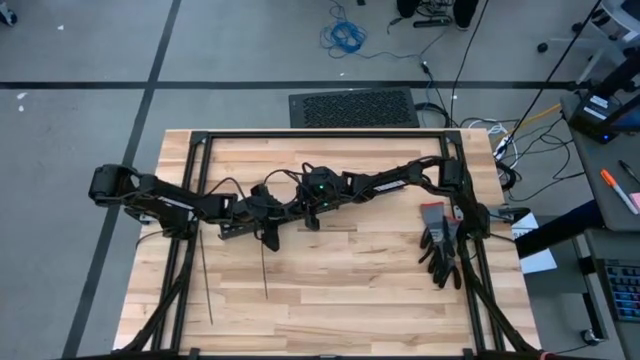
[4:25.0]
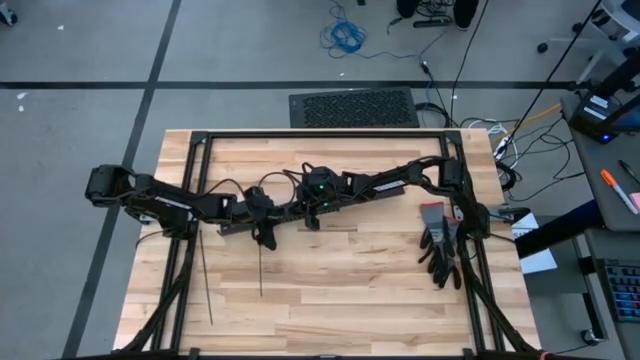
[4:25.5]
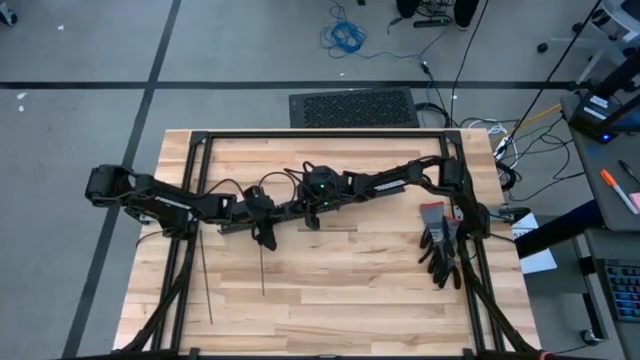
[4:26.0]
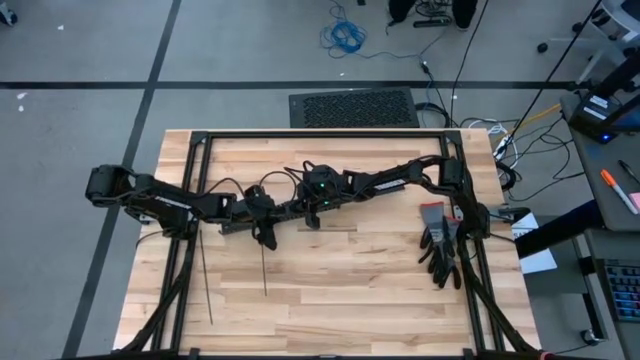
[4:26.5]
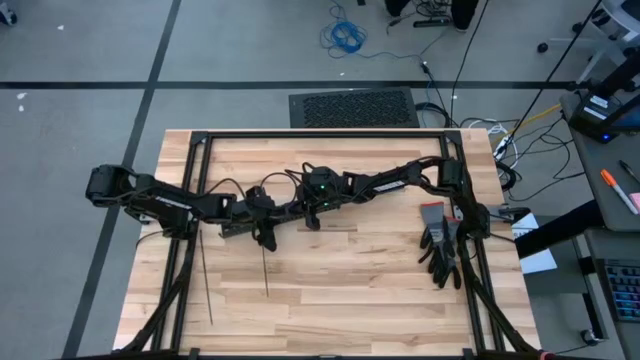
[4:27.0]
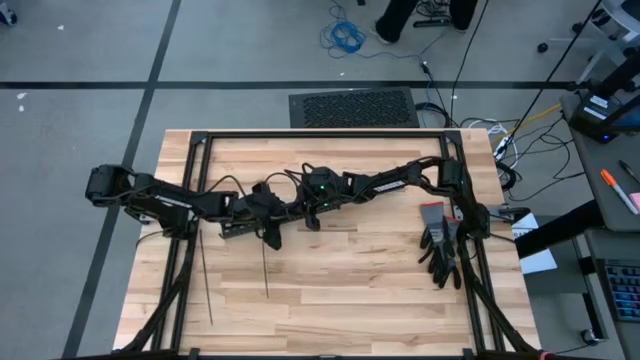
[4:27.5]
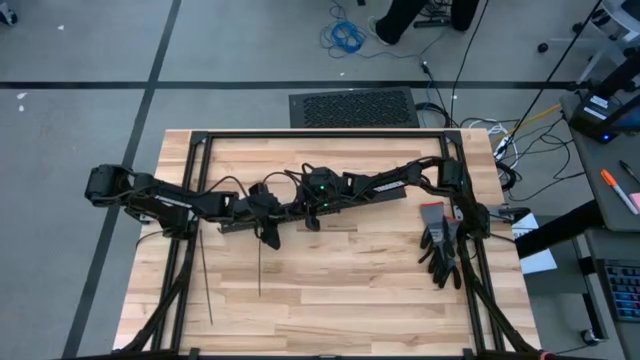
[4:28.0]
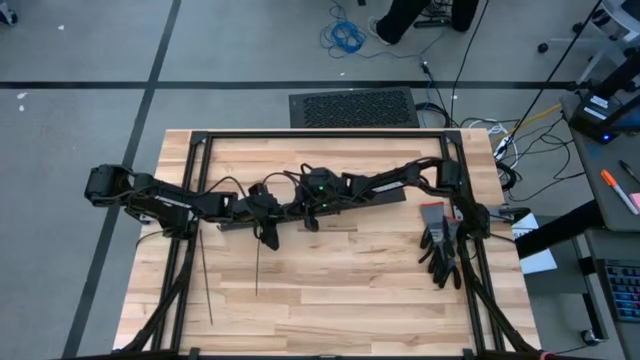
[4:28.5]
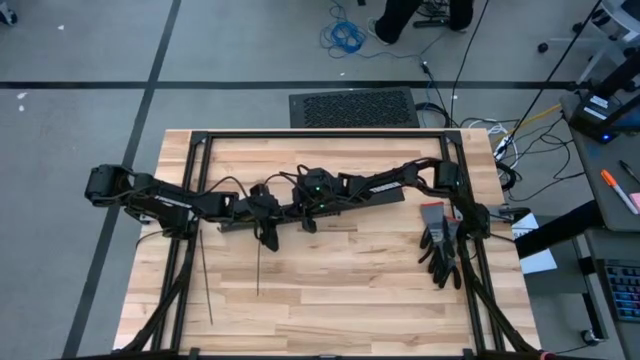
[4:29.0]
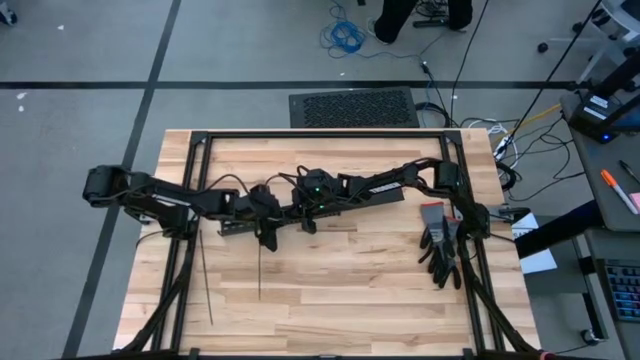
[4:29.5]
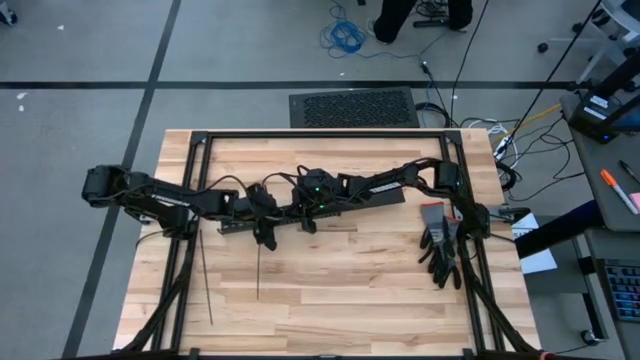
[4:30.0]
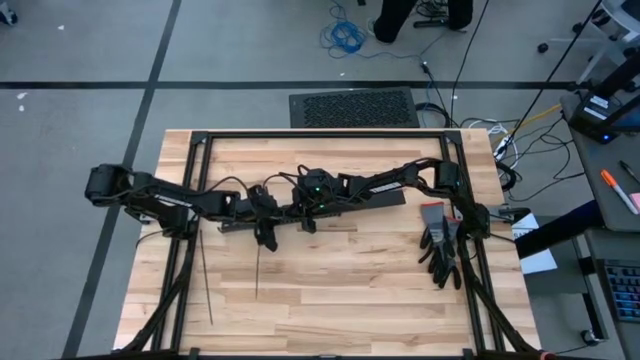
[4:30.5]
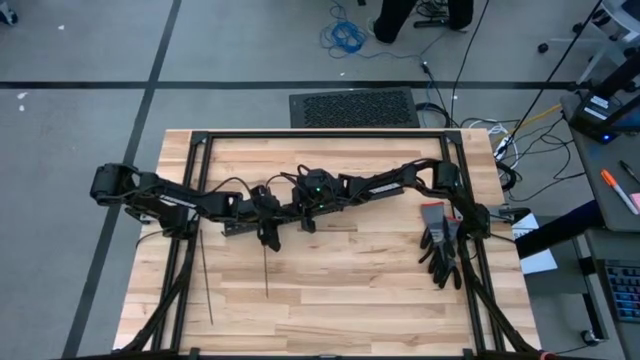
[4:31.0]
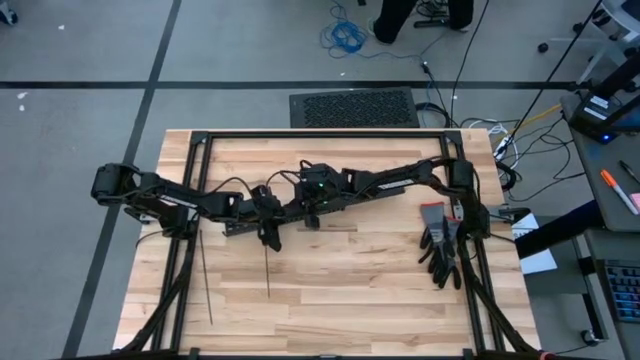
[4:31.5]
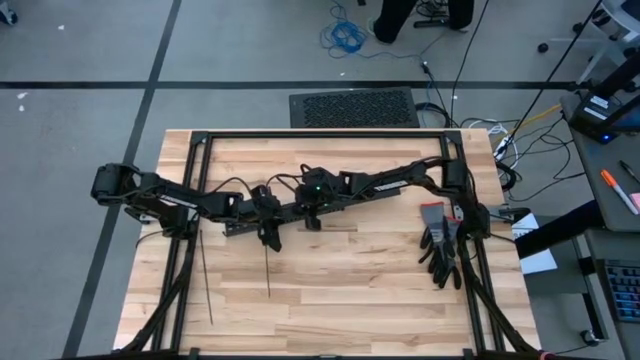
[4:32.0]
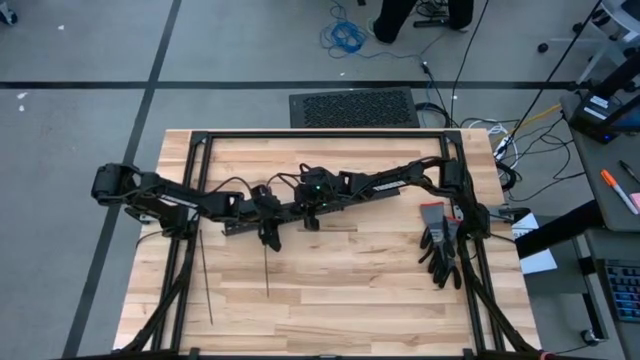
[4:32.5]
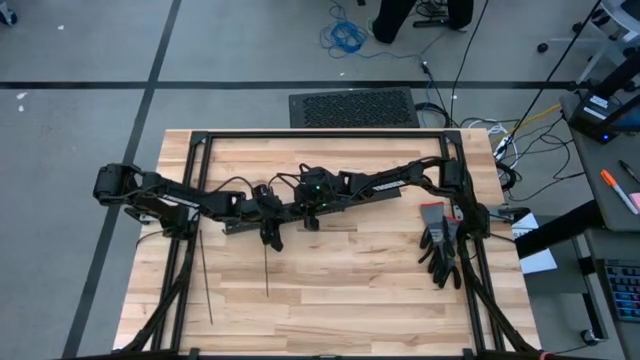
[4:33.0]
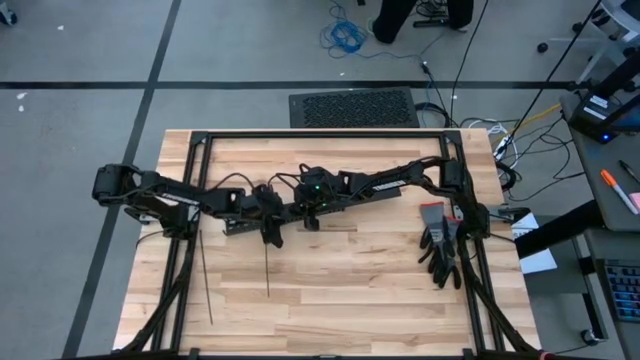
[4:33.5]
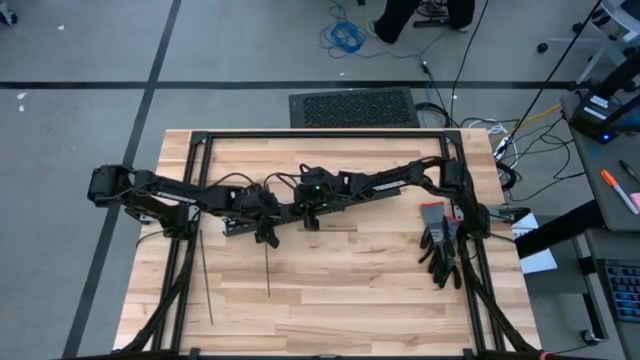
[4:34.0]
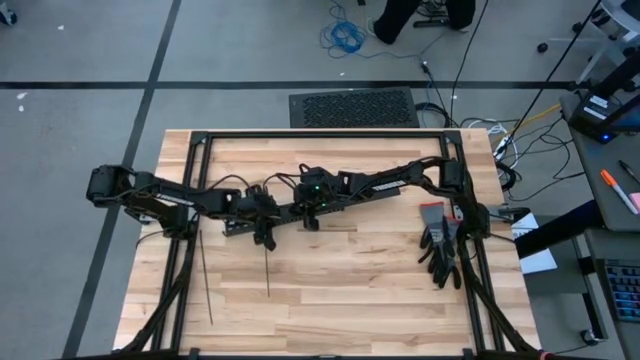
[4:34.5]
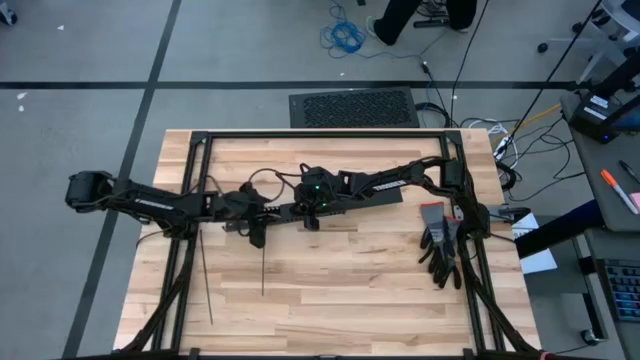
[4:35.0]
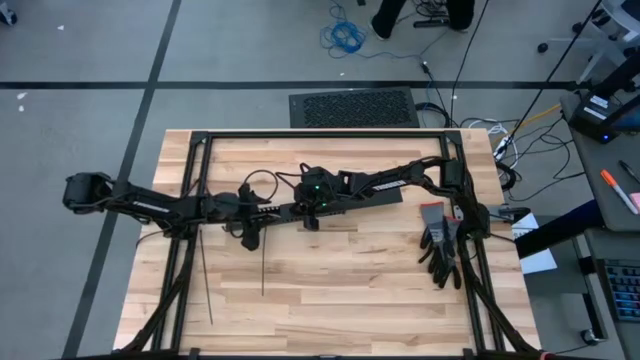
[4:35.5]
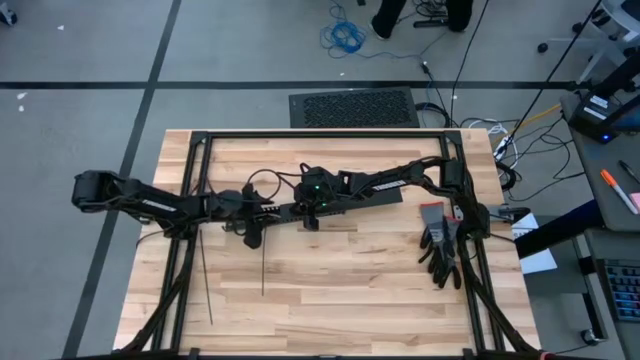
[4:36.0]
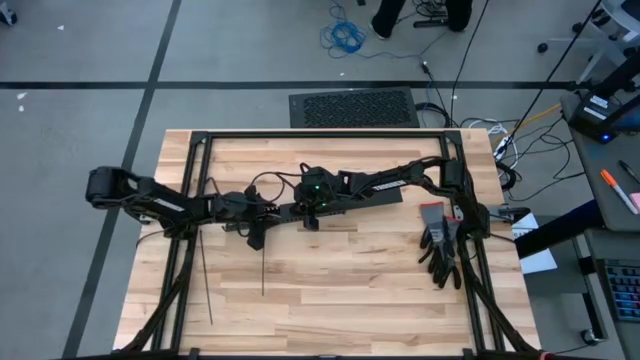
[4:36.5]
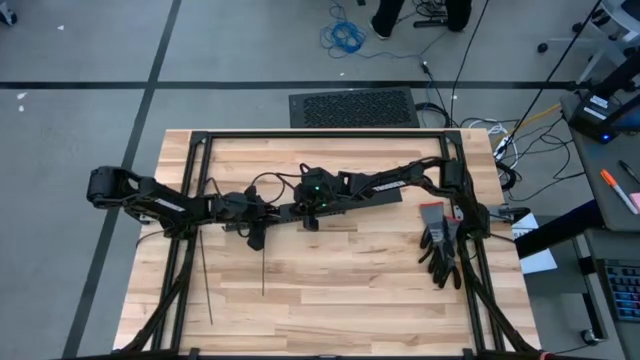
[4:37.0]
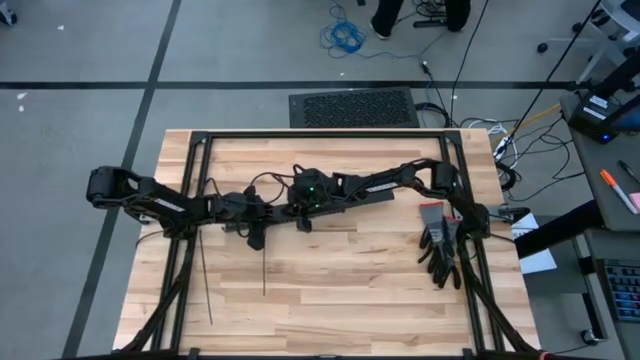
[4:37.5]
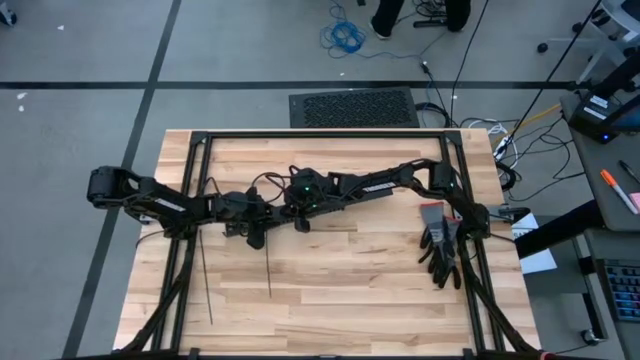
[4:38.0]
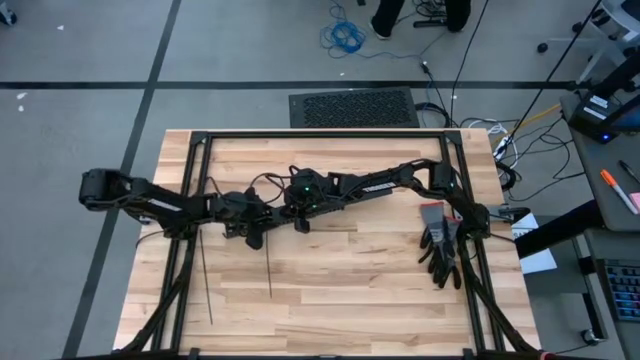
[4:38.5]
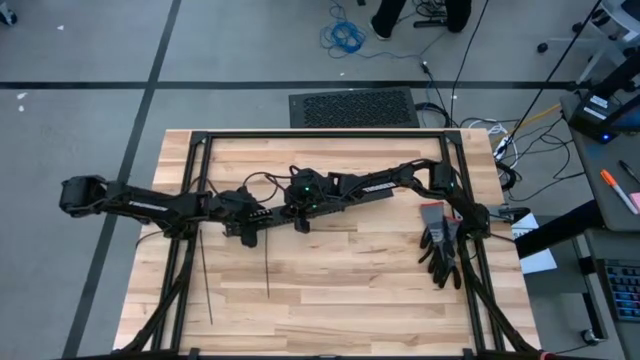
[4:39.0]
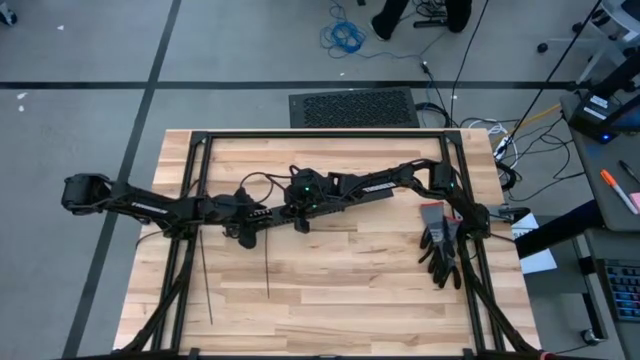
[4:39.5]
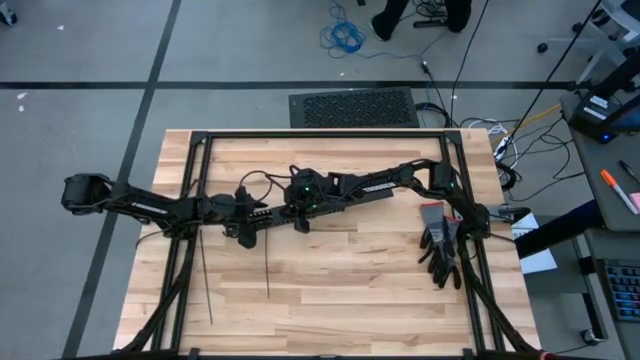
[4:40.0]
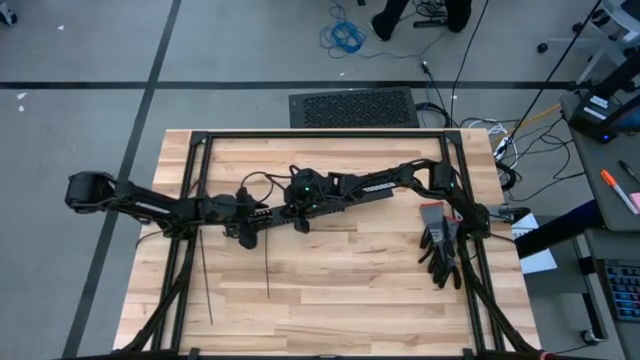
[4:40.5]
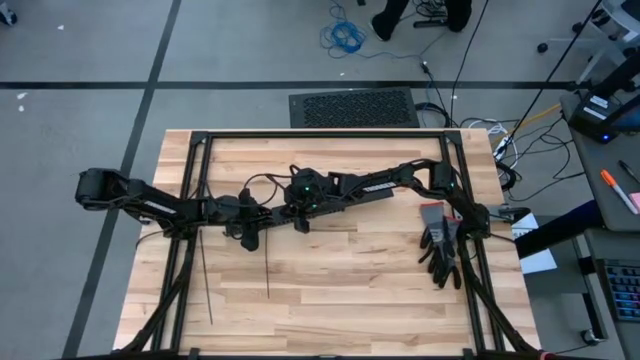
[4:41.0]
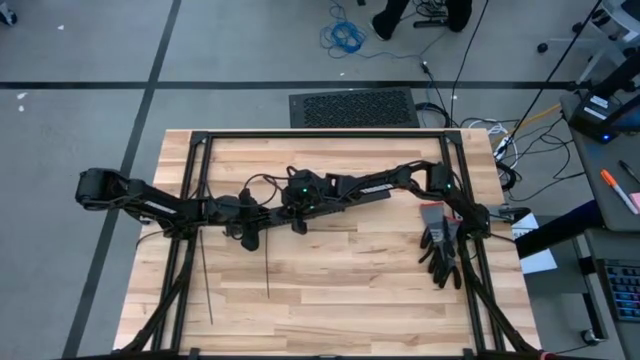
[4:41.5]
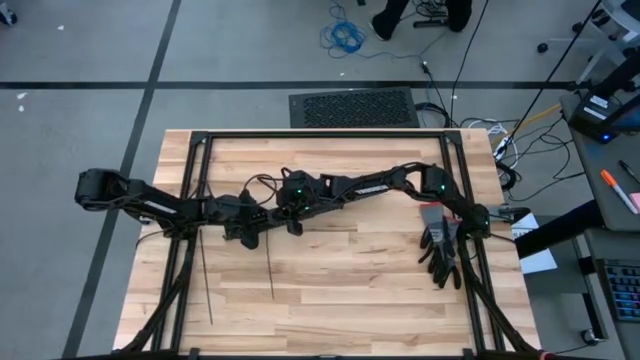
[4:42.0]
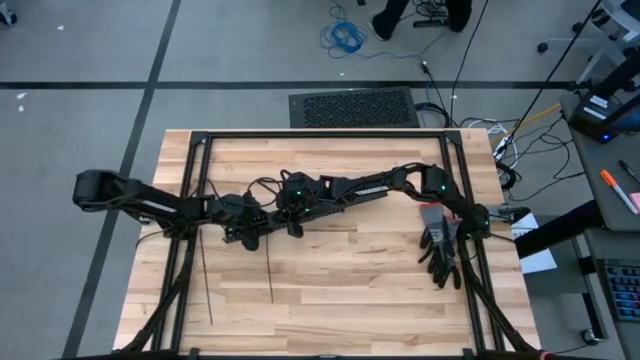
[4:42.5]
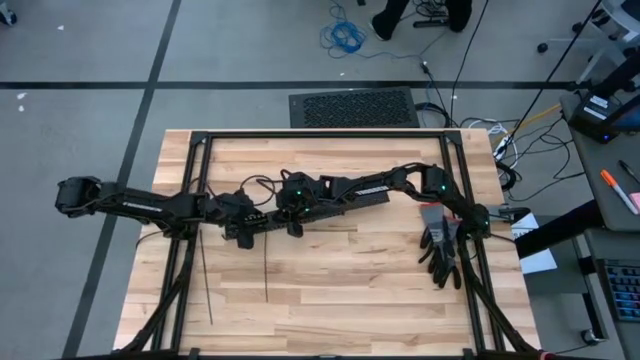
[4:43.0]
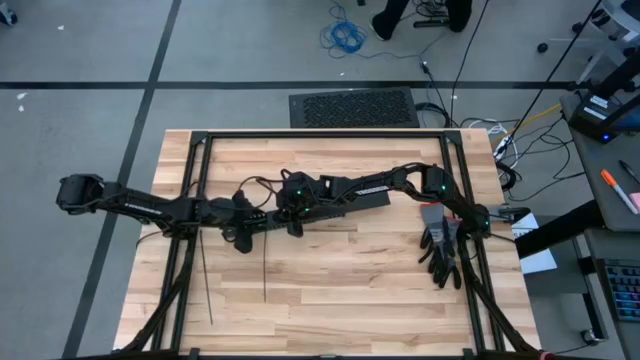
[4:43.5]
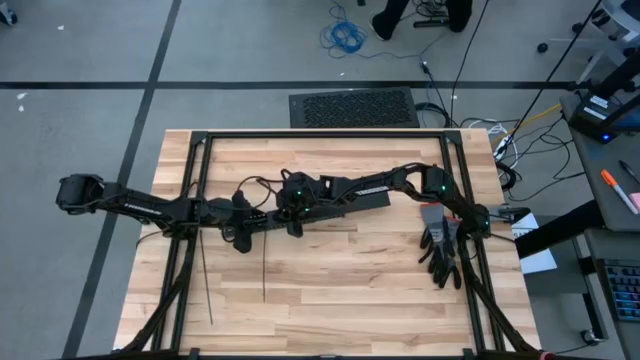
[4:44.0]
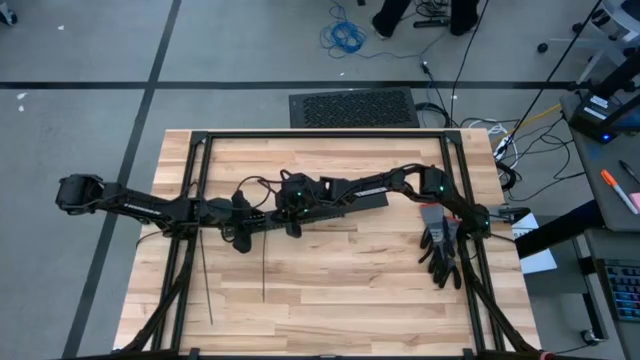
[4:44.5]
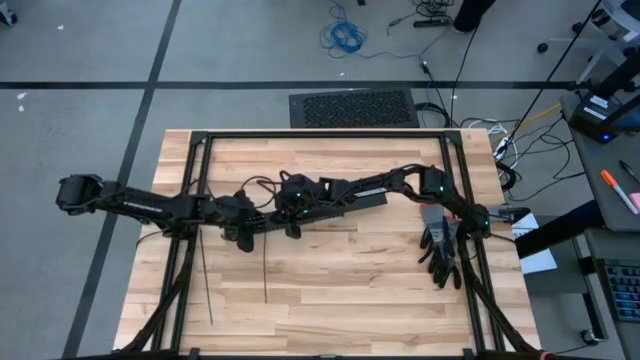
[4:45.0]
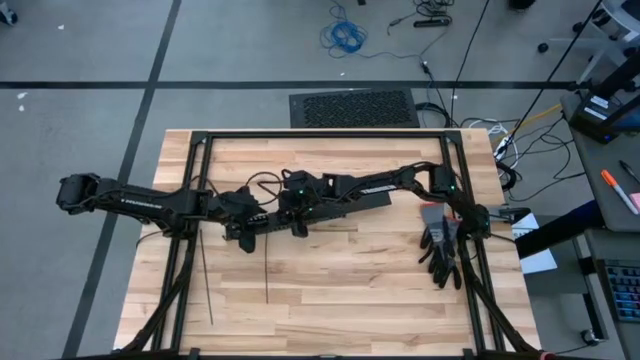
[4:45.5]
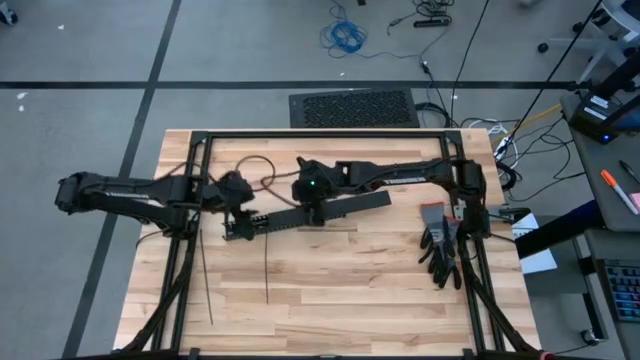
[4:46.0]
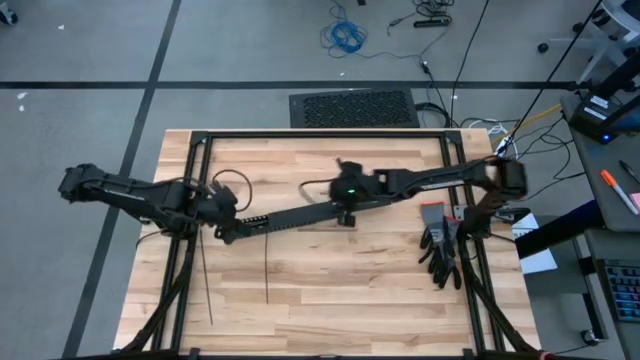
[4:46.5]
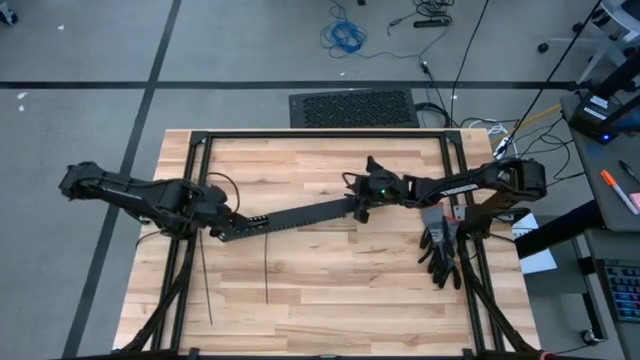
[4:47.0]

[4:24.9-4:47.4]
Task: Ziptie cables
Close the black cable duct with the cable duct cover
